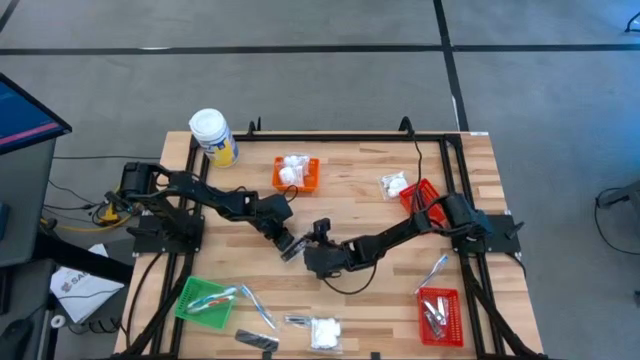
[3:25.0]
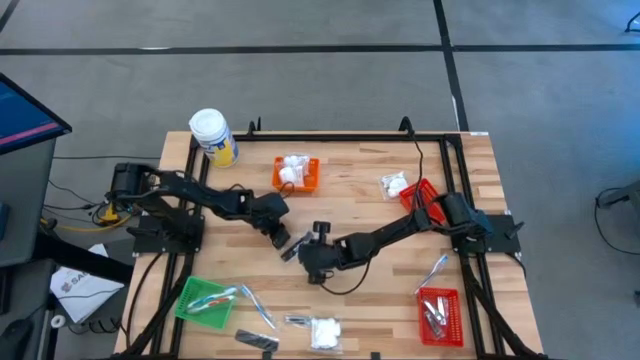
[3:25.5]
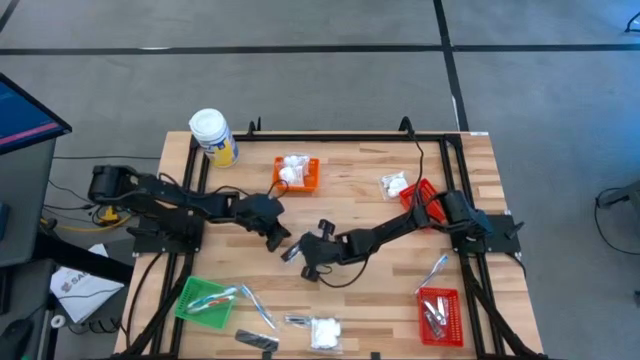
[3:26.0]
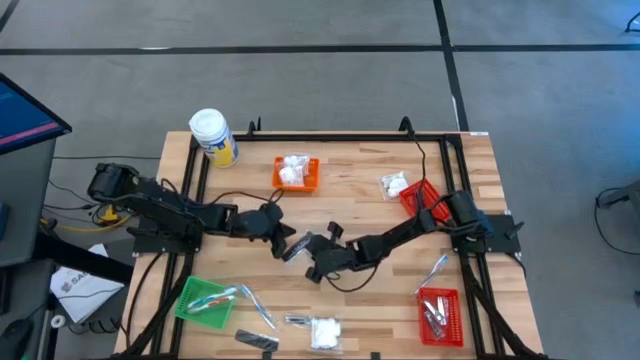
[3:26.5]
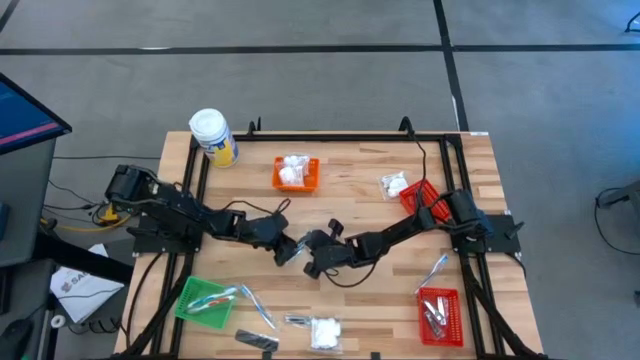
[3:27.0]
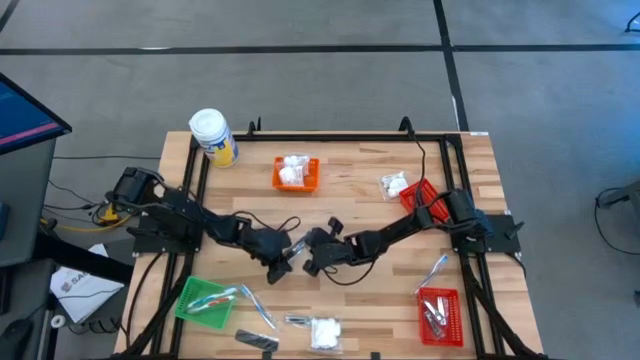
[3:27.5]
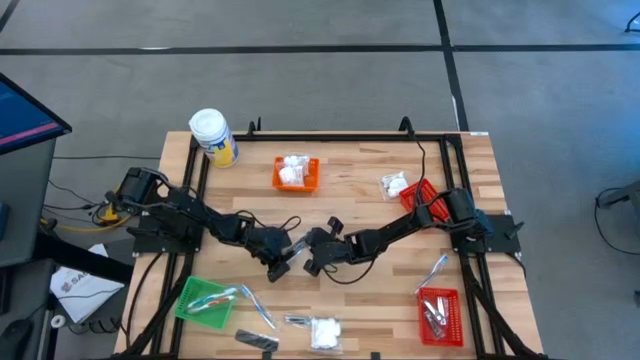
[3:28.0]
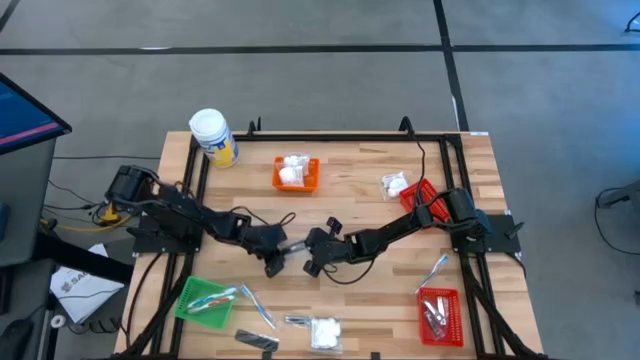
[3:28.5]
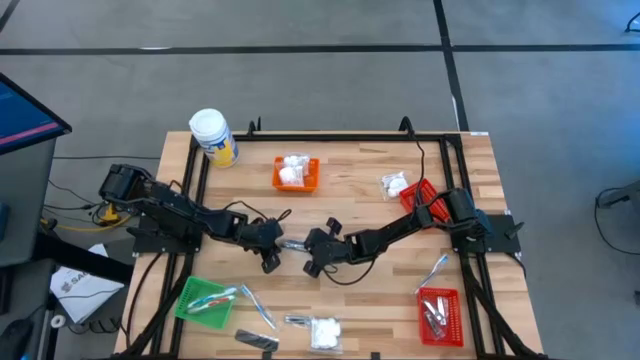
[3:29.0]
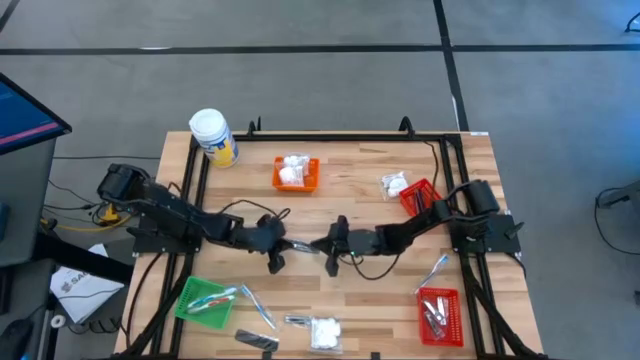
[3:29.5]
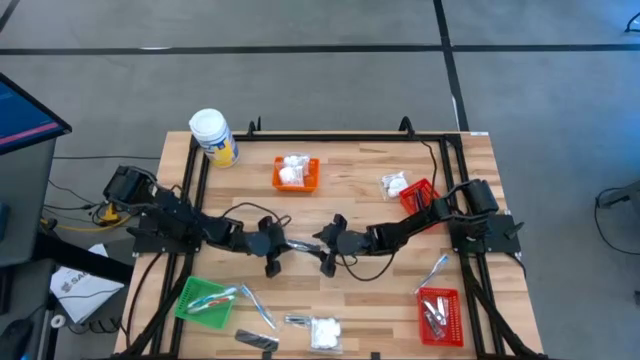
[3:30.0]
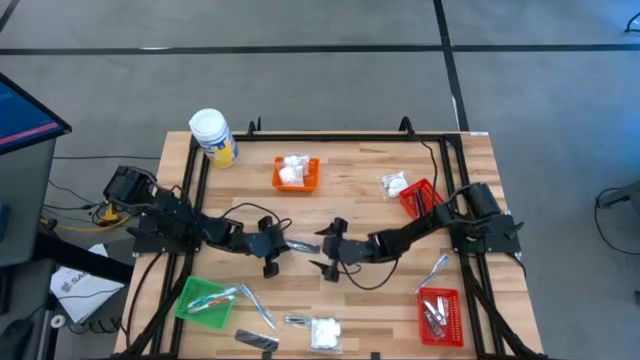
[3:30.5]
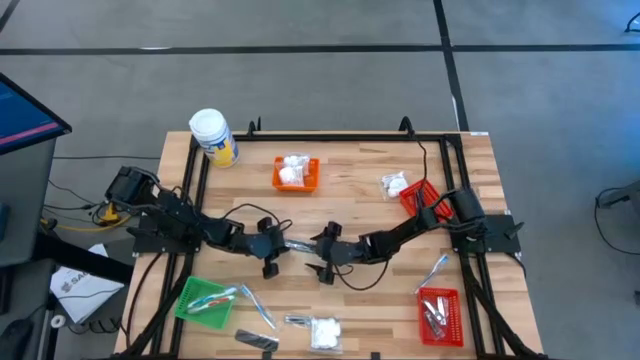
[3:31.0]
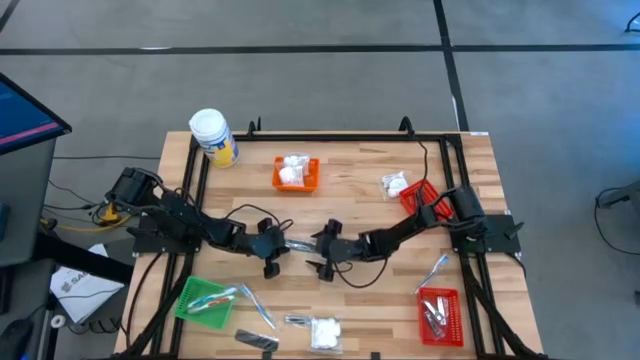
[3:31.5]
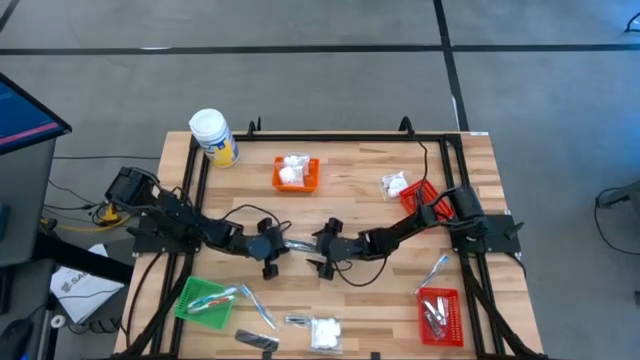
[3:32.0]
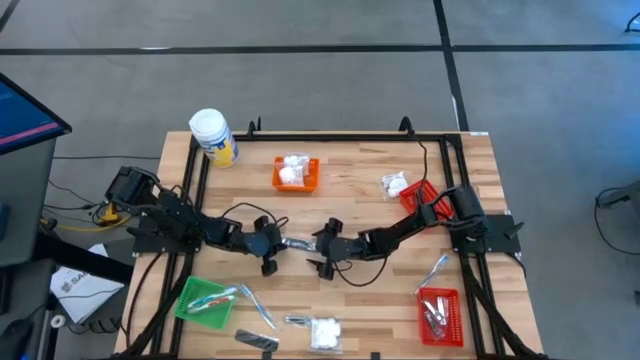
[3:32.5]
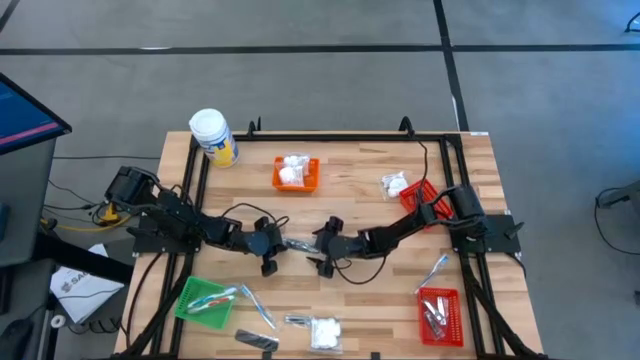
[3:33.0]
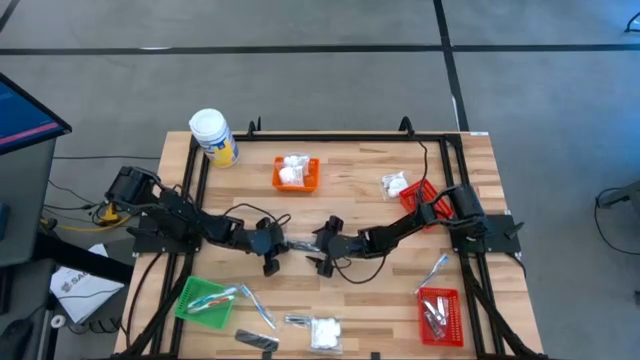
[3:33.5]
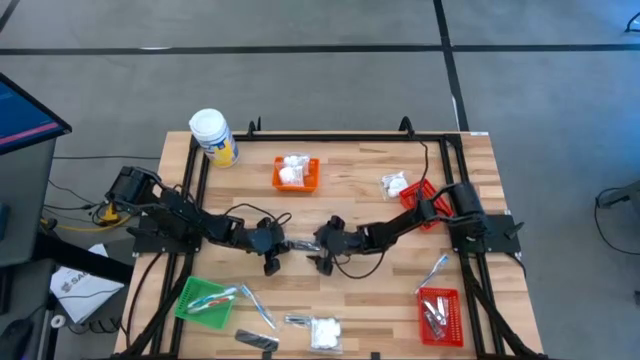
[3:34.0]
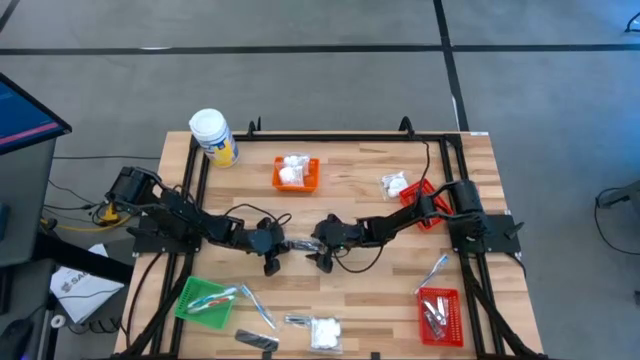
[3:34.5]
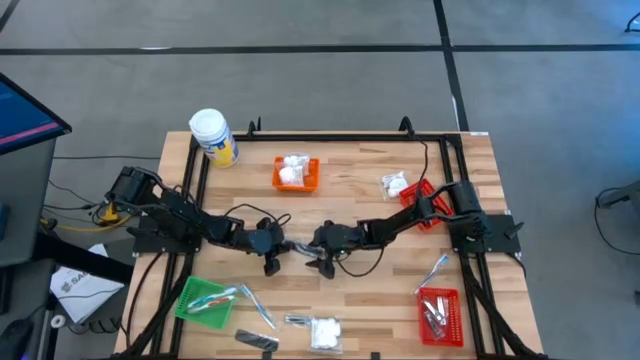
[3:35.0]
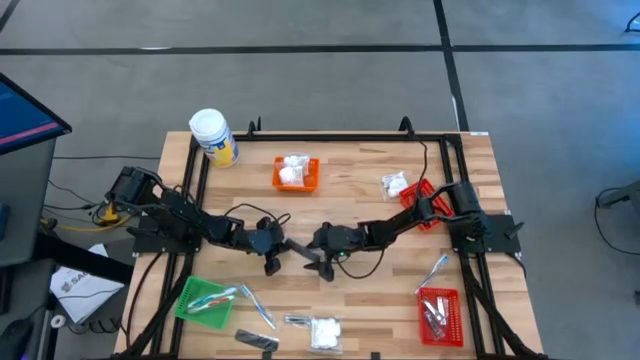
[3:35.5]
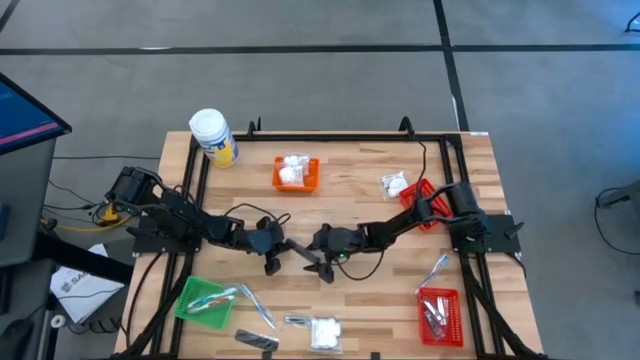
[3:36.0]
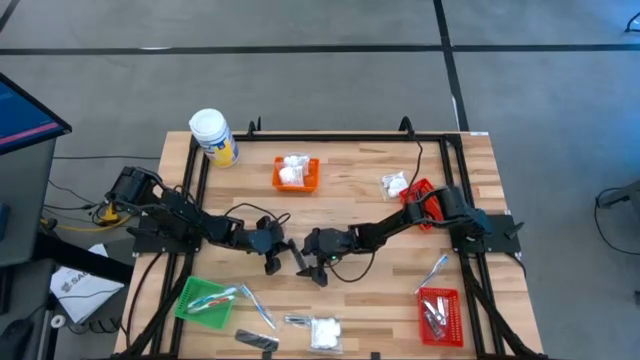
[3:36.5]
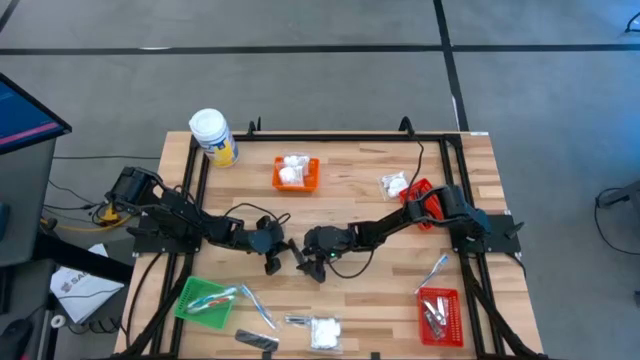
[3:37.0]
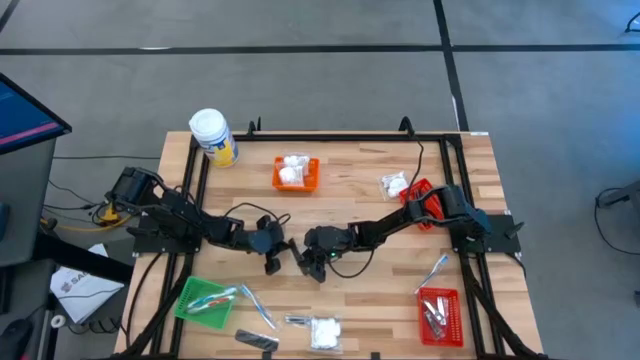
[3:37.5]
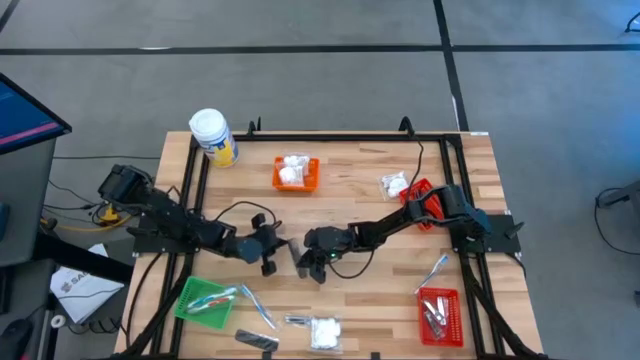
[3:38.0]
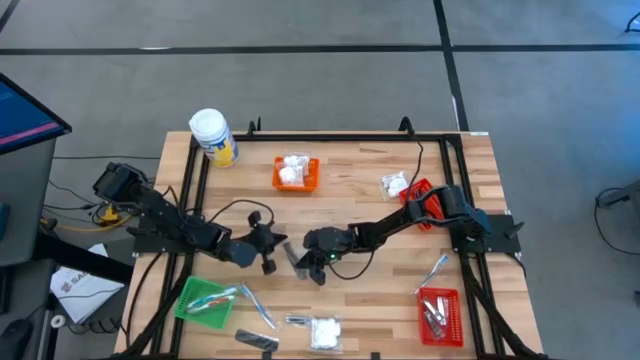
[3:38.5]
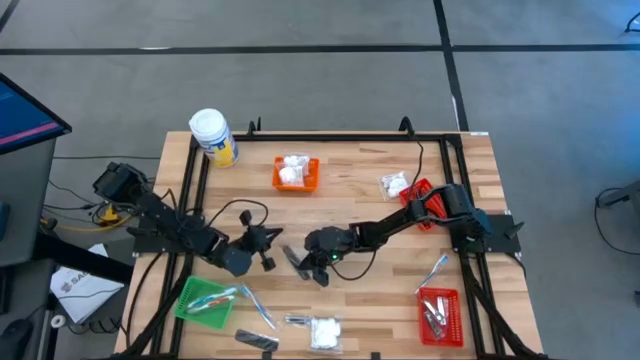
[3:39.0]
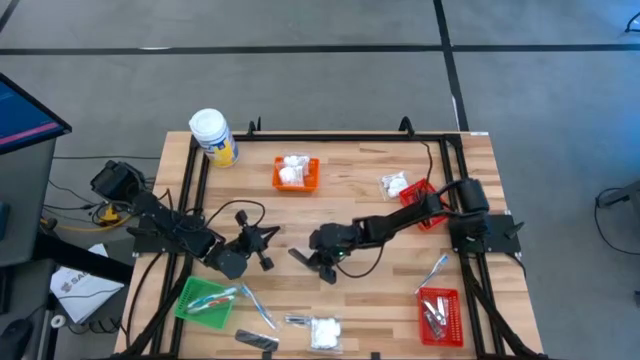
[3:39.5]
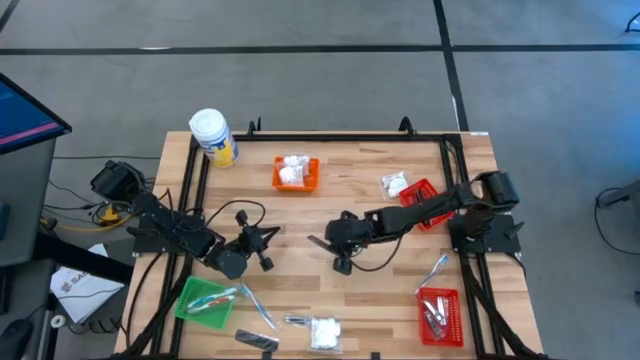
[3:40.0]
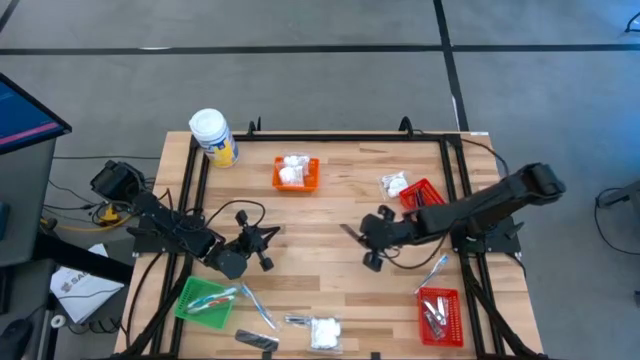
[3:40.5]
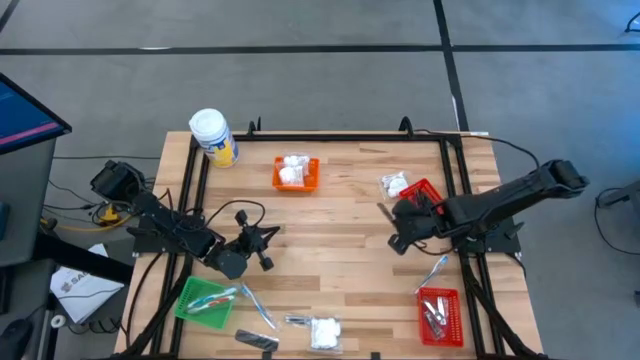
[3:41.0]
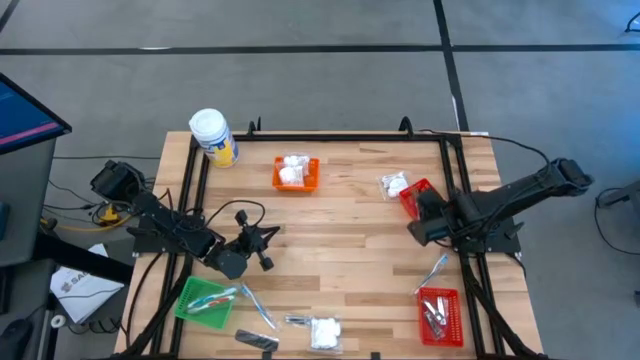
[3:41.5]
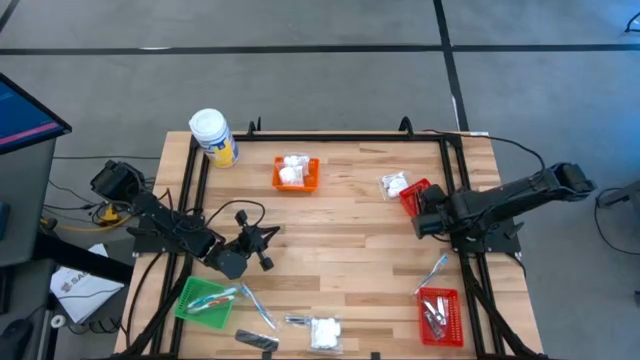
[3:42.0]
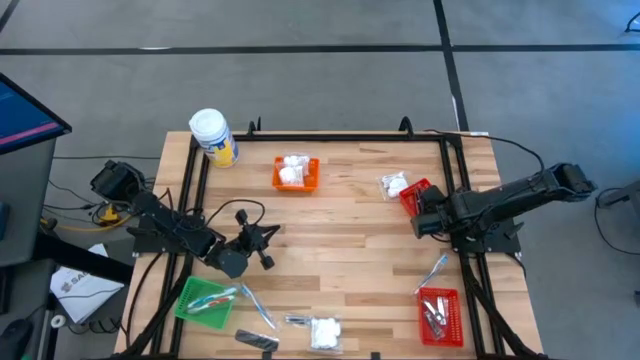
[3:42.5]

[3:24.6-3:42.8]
Task: Pick & Place Travel size toiletries
Put the black comb into the top red basket

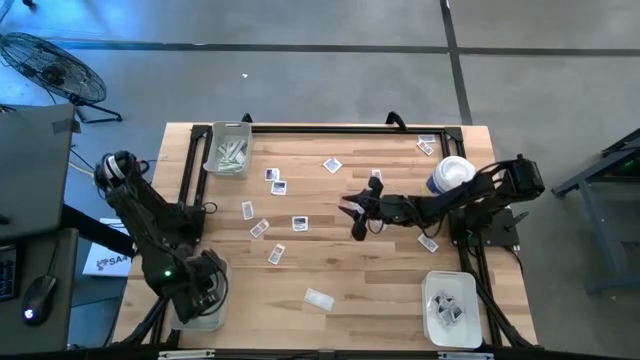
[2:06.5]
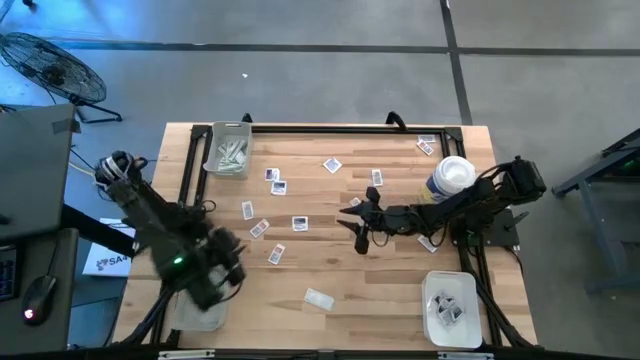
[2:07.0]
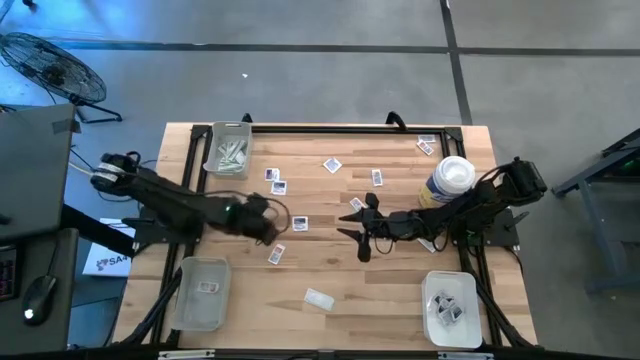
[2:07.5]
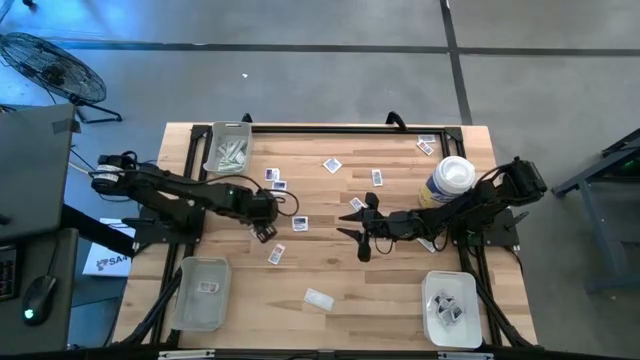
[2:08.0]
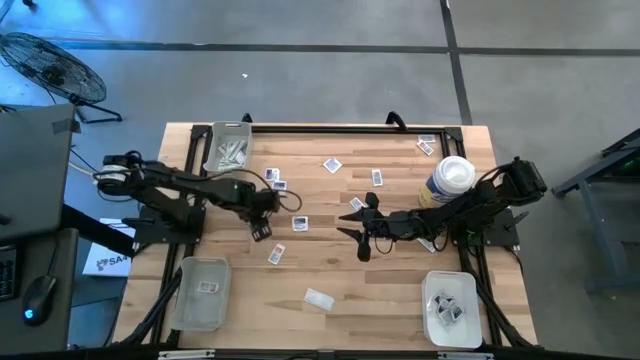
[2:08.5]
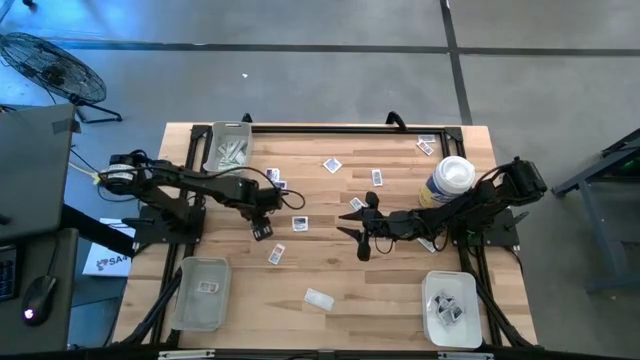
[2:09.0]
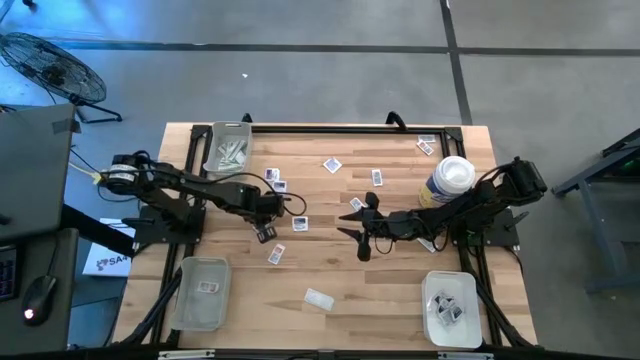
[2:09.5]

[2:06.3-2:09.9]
Task: Pick & Place First Aid Supplies
Put the orange ointment pack into the bottom gray bin
